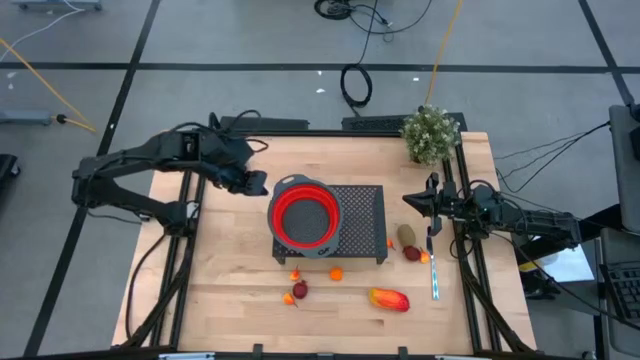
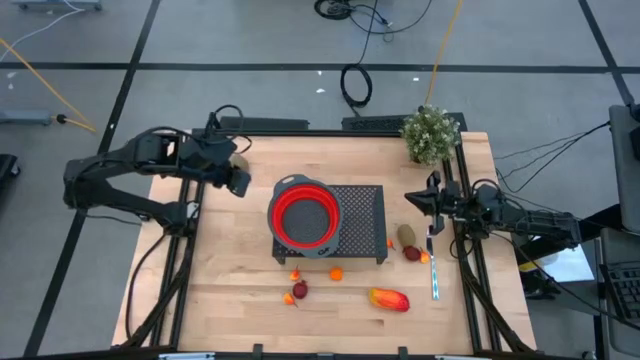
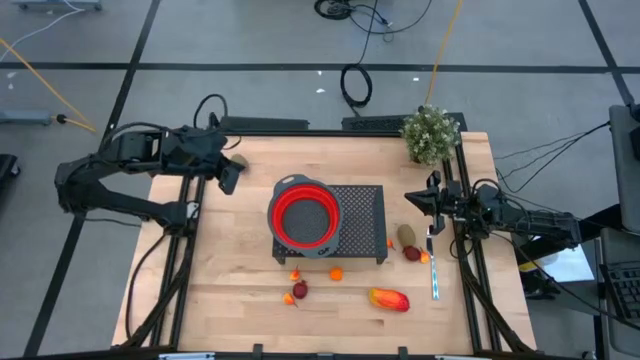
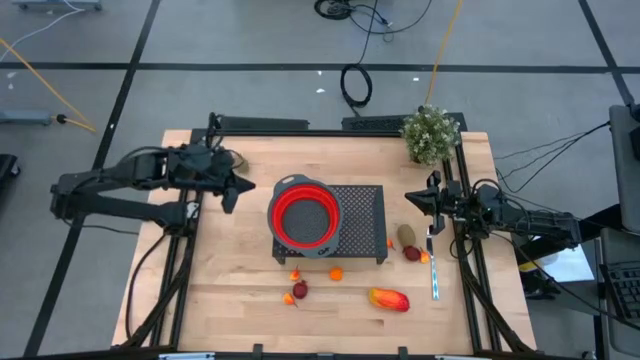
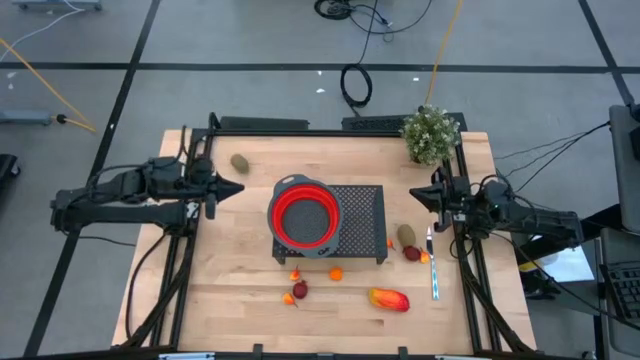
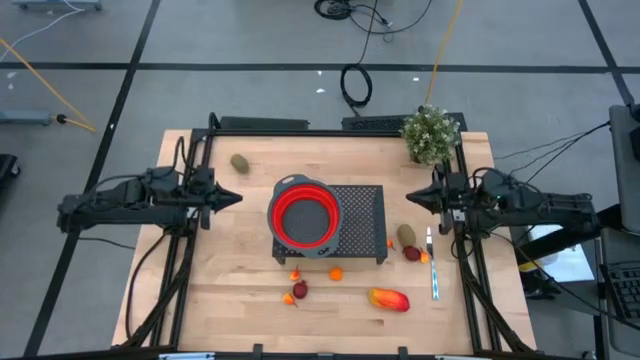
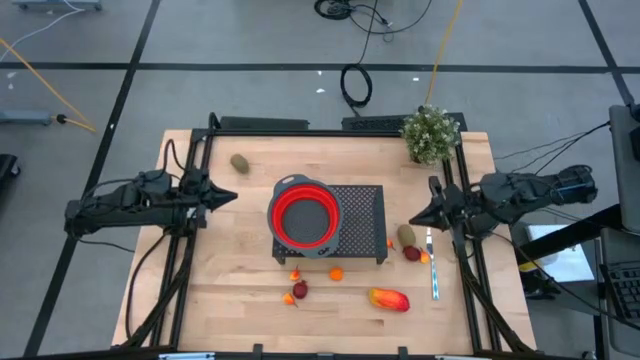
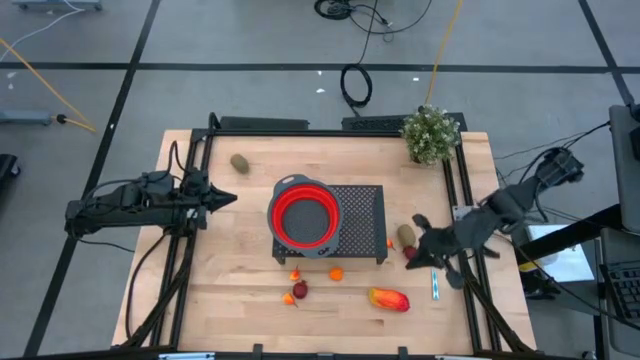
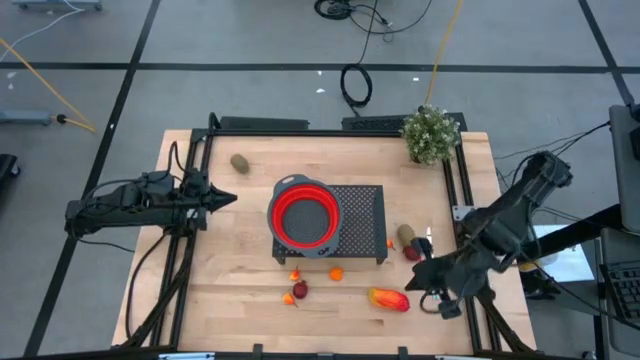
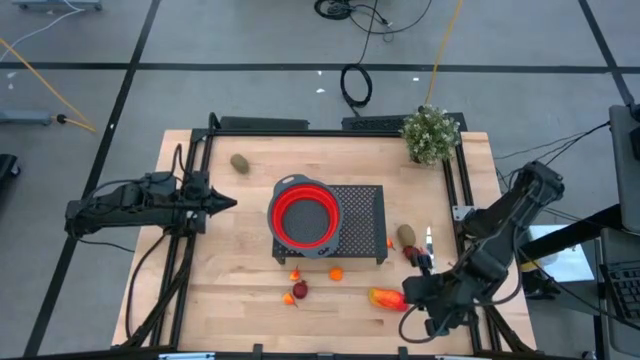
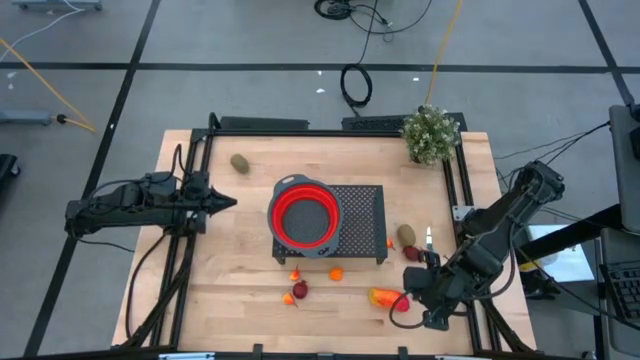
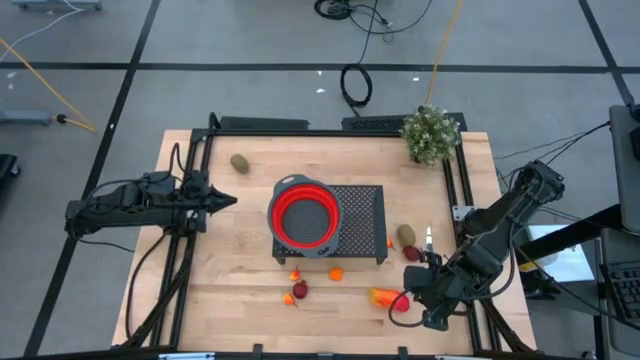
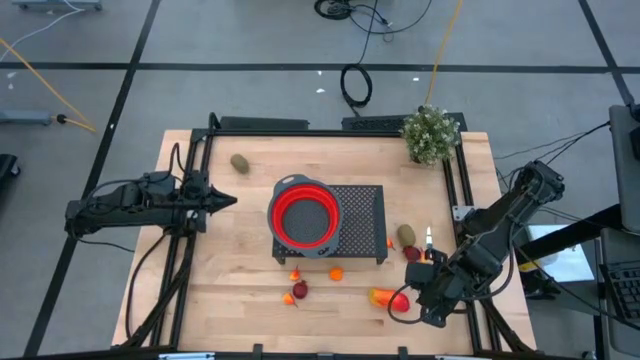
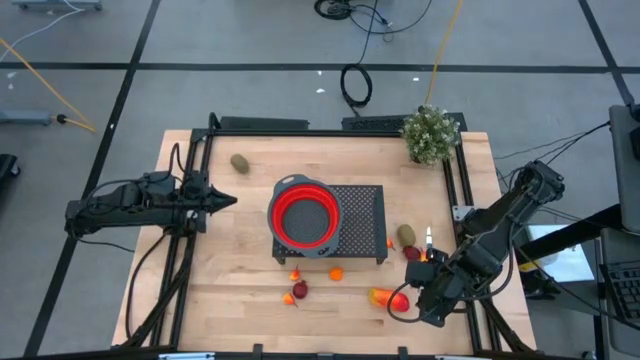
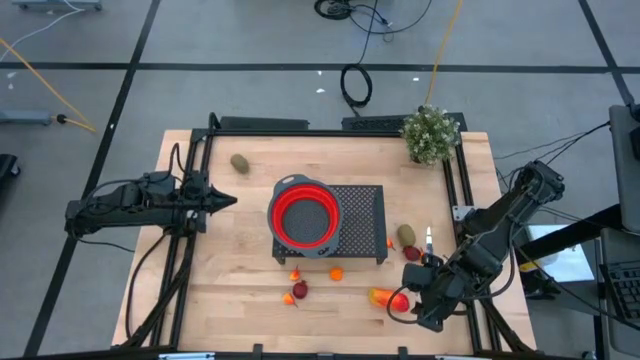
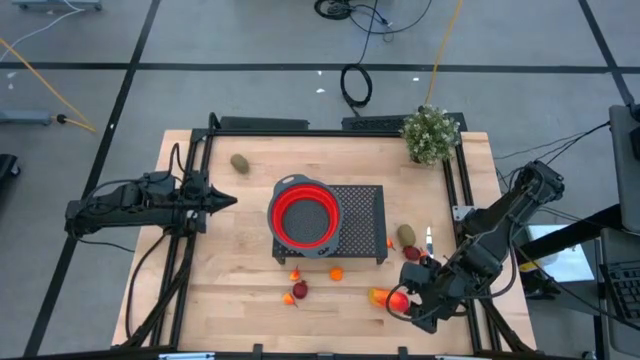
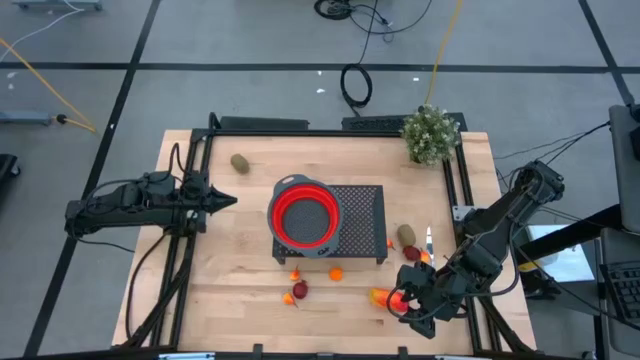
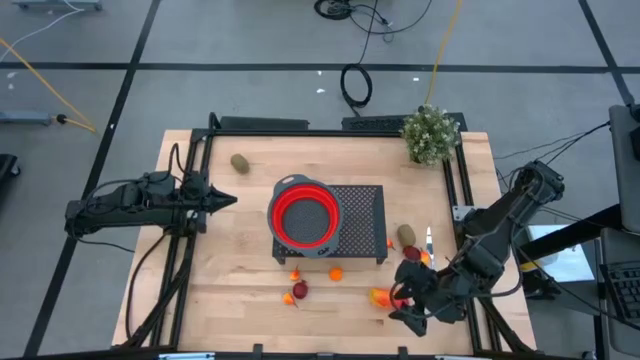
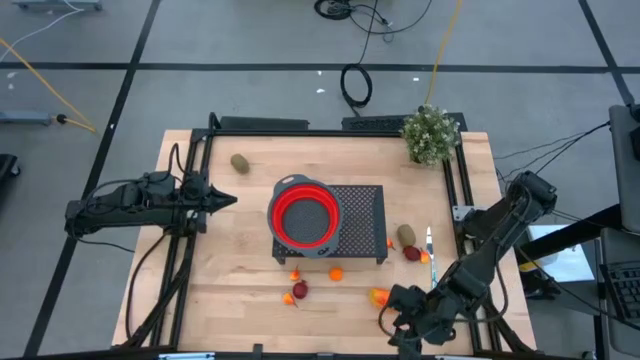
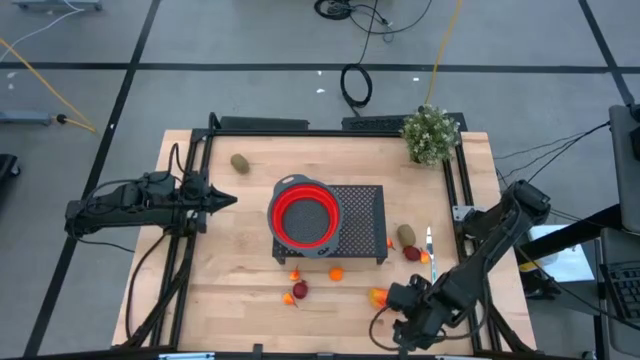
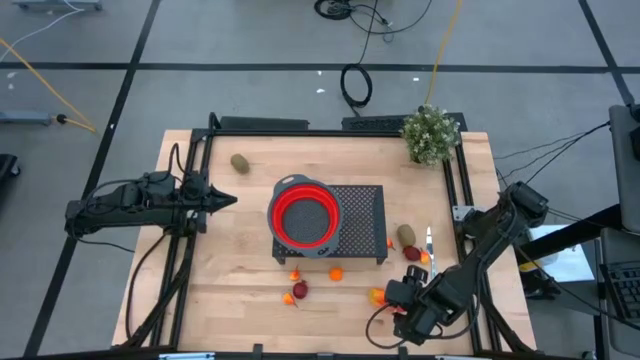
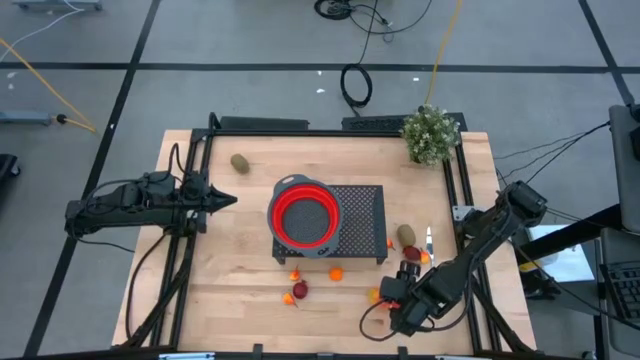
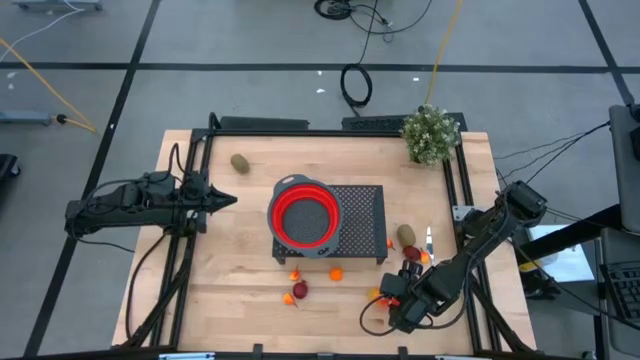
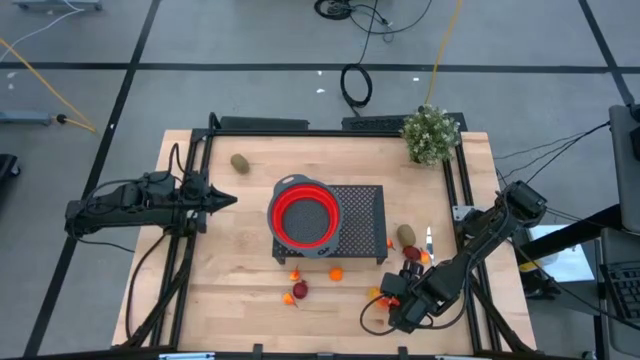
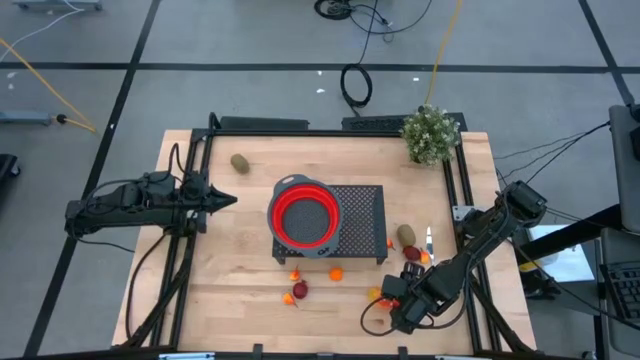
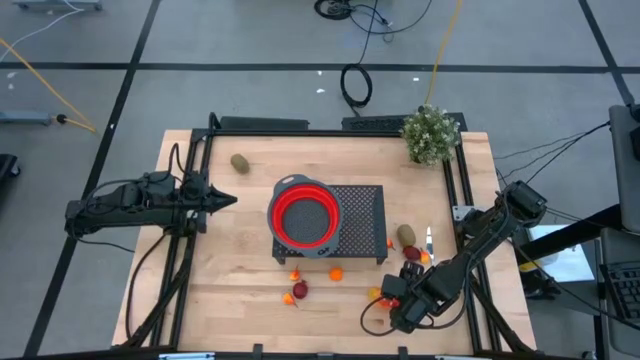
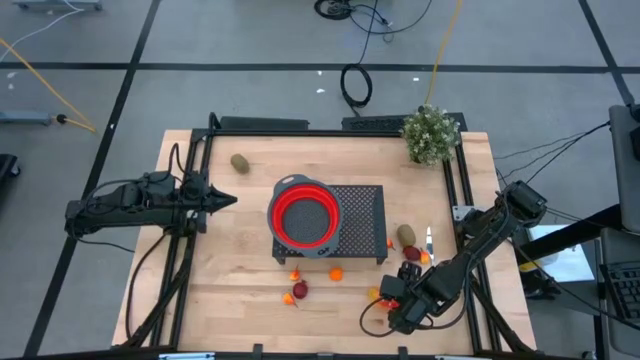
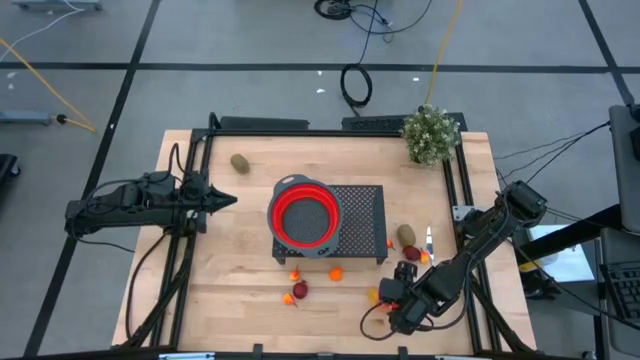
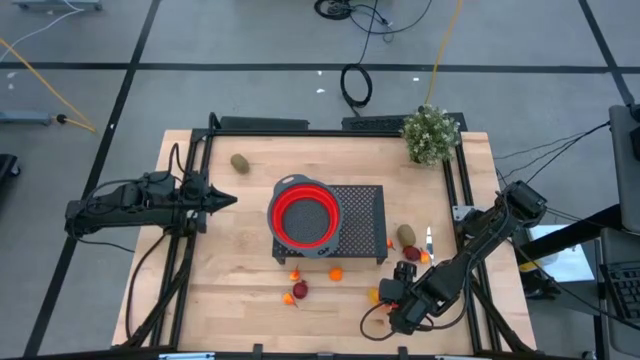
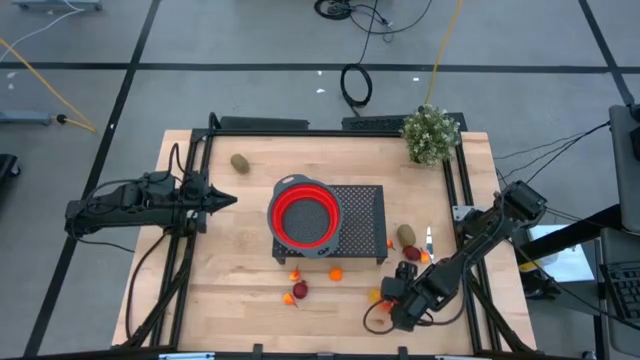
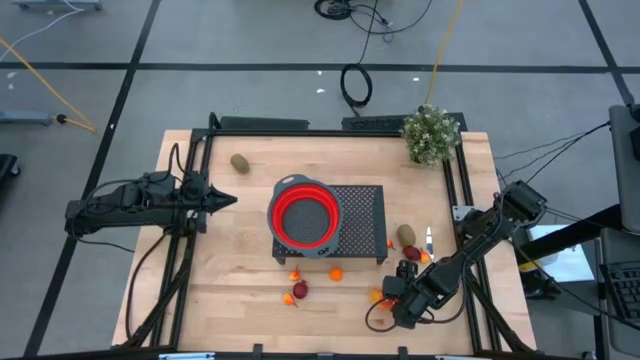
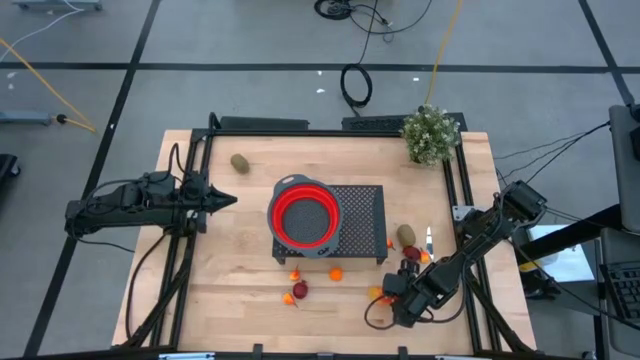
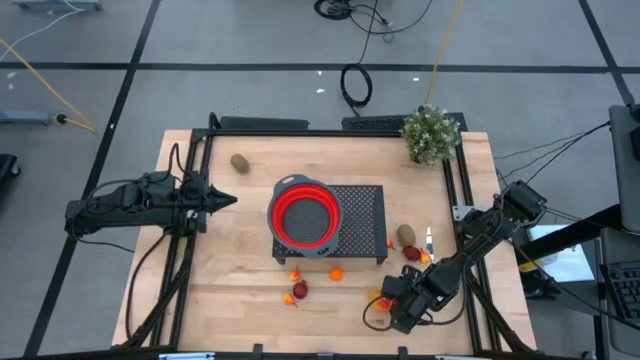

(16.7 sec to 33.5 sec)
Task: Pick & Place Fruit
Put the mango into the red colander on the shelf
